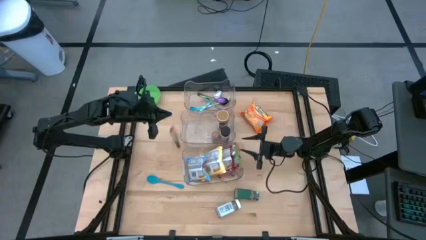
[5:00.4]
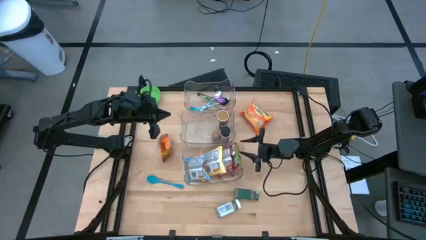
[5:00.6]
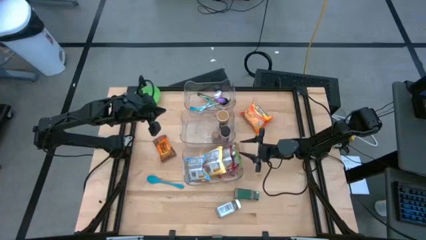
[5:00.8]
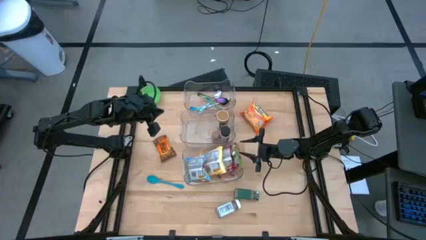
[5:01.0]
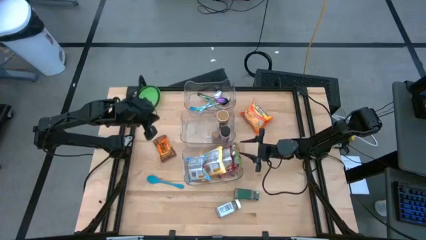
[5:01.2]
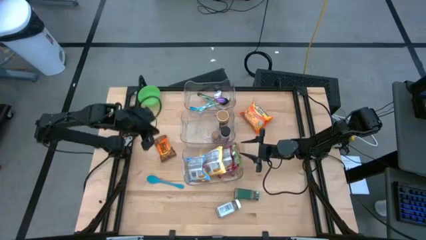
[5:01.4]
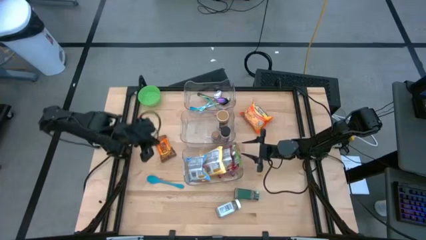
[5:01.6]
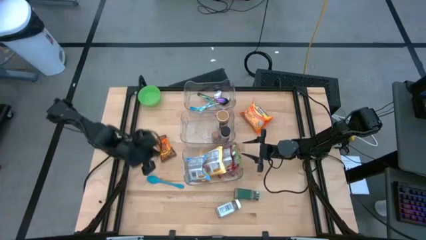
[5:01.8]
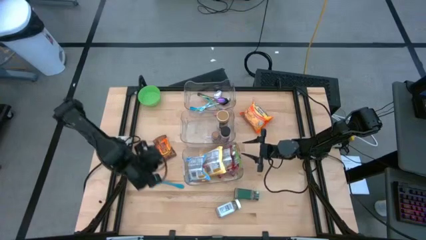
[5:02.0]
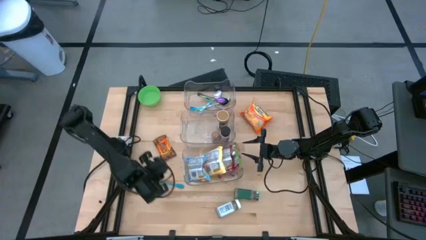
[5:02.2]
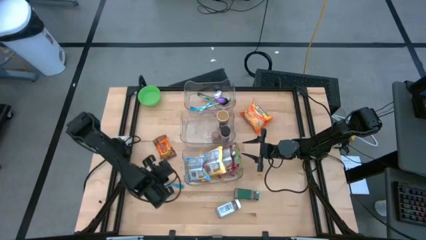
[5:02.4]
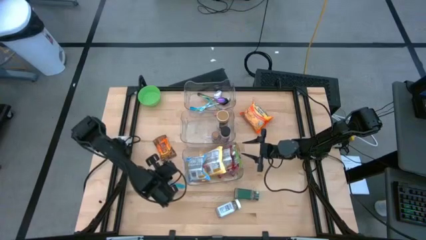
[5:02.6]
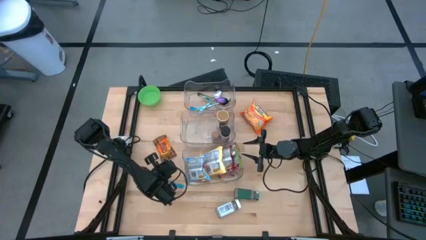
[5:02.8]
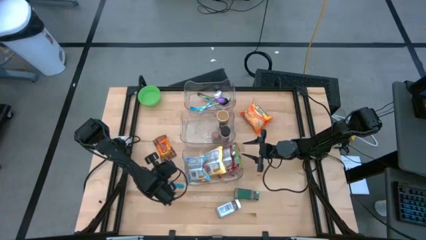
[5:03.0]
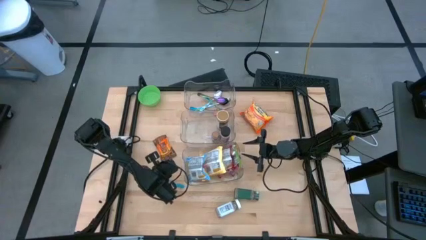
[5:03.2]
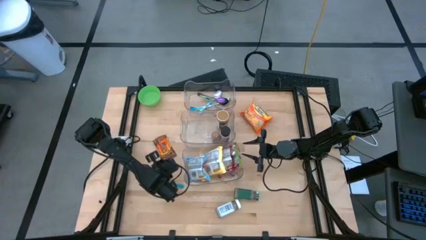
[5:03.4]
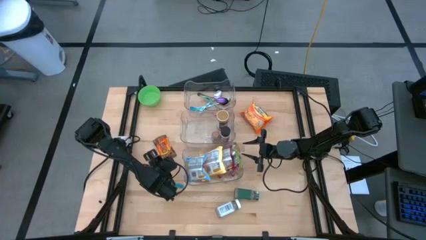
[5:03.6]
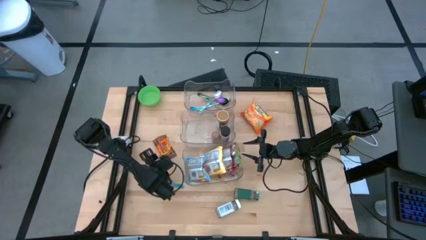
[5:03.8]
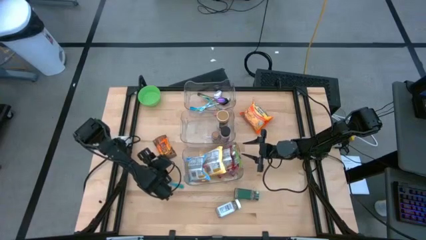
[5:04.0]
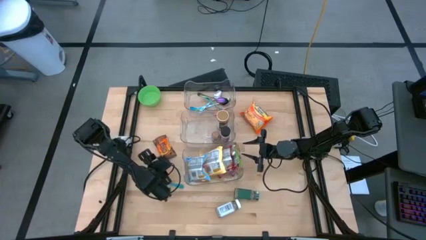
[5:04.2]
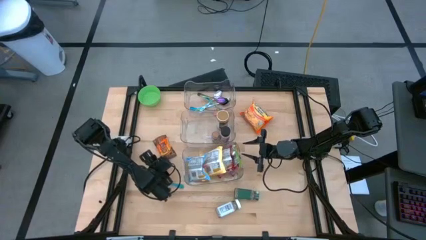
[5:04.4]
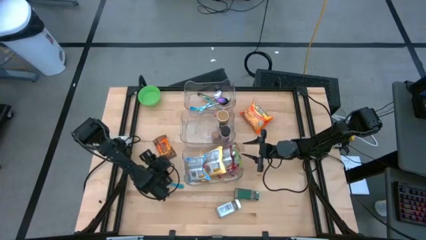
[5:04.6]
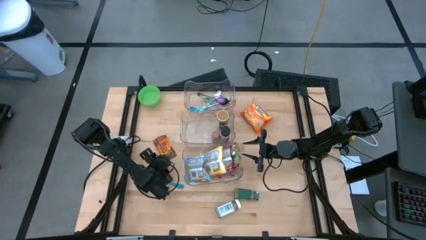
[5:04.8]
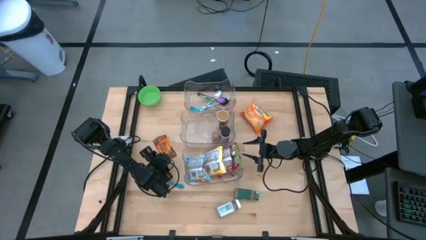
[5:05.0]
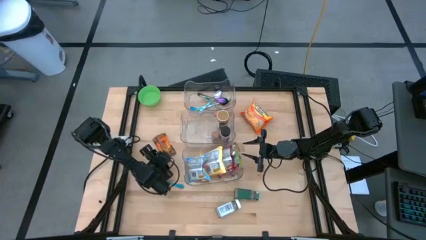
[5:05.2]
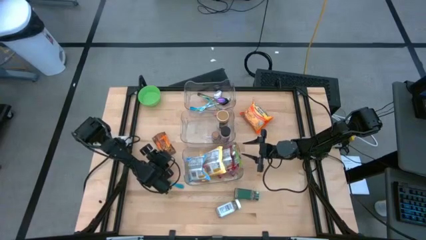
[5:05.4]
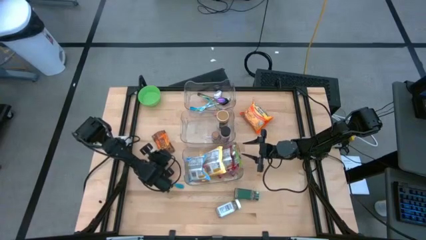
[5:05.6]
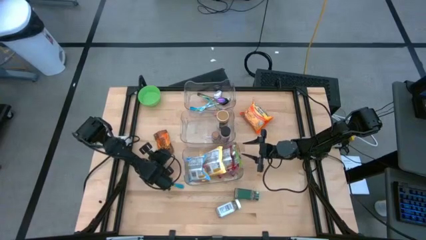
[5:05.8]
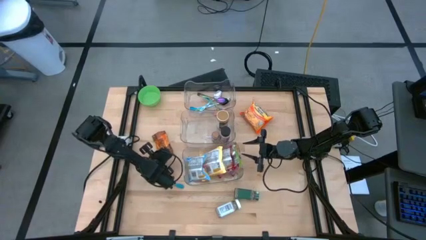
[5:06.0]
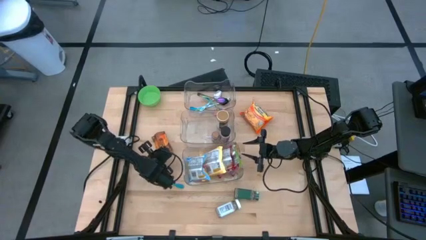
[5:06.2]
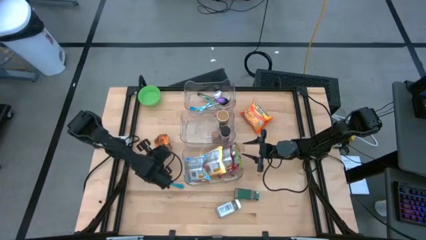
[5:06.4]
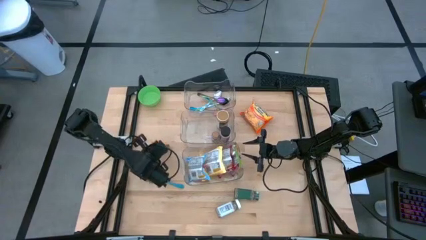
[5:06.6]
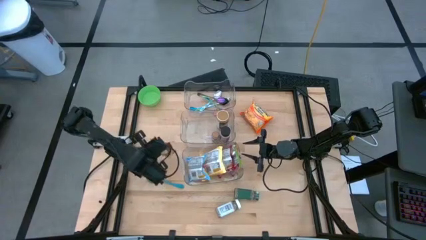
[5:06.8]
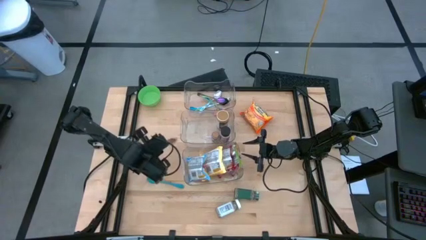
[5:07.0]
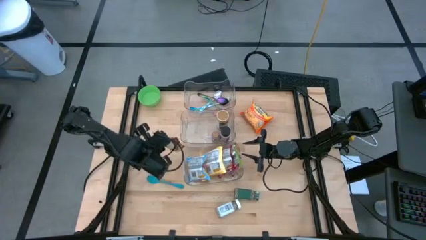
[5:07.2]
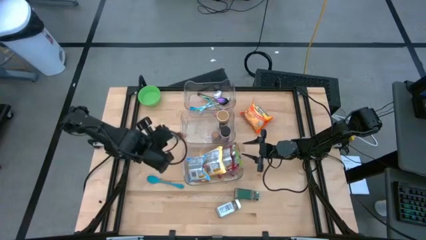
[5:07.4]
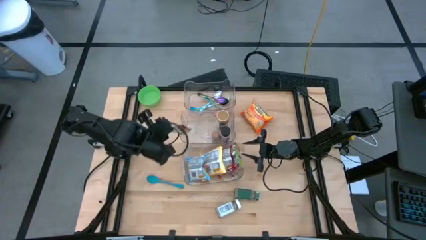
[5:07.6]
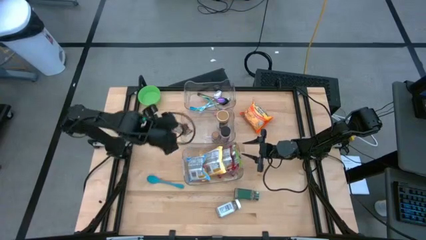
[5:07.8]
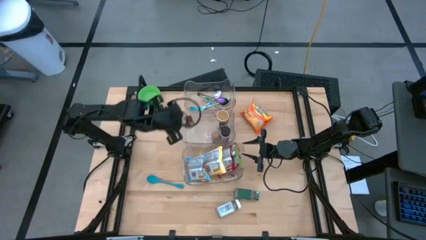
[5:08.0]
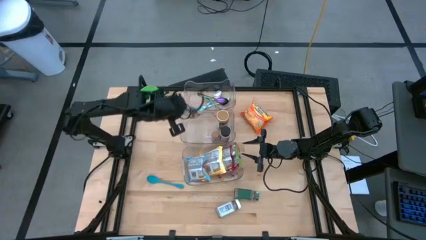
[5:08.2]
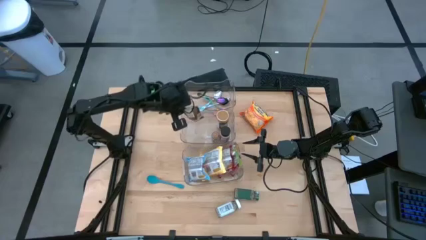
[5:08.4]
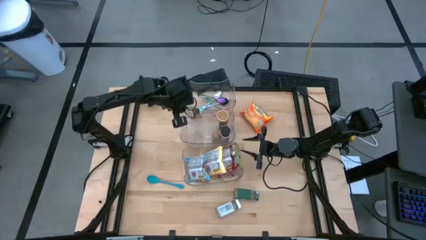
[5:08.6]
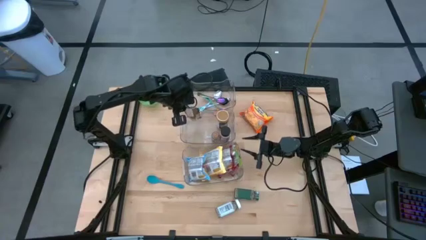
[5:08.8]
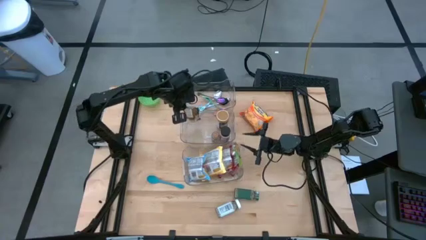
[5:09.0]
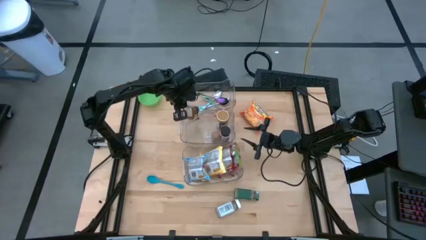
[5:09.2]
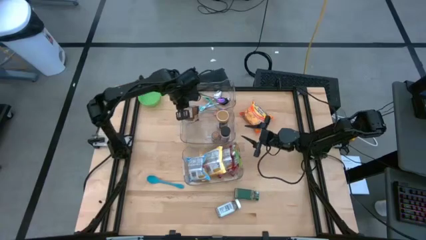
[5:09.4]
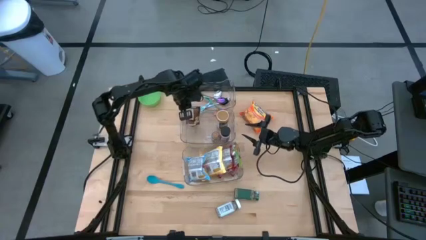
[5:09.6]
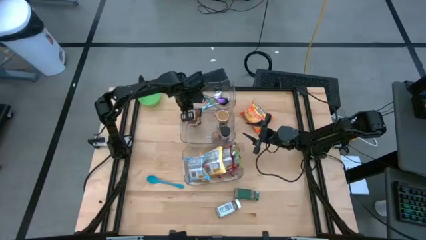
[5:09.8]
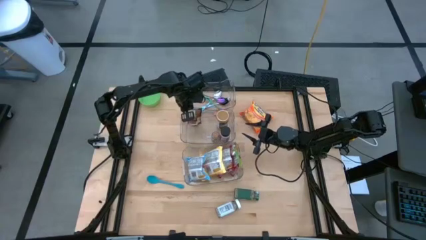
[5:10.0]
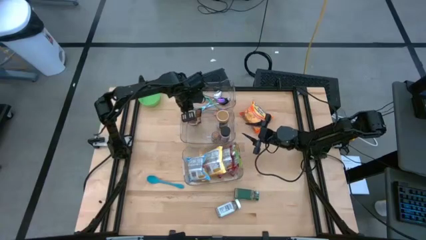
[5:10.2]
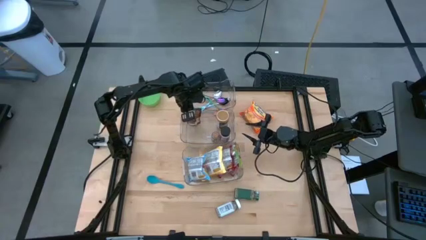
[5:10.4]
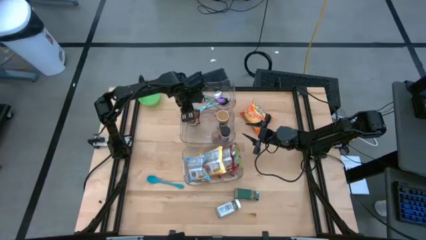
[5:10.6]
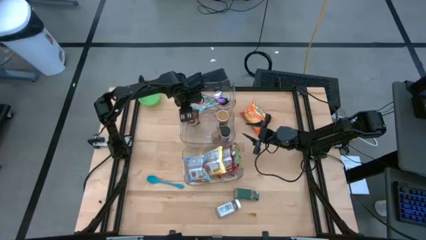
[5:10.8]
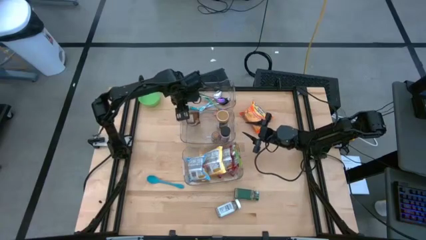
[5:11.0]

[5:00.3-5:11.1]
Task: Pick & Place Food Item
Put the orange seasoning packet into the middle transparent bin

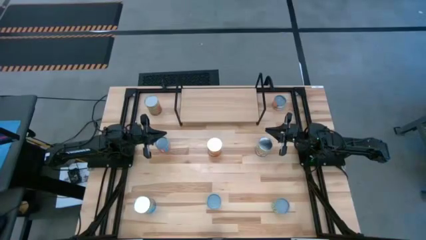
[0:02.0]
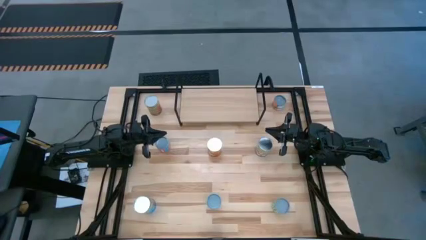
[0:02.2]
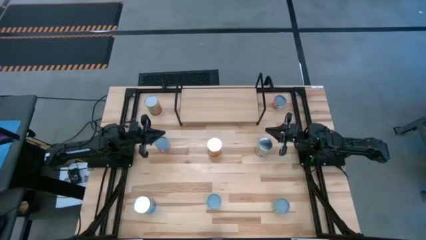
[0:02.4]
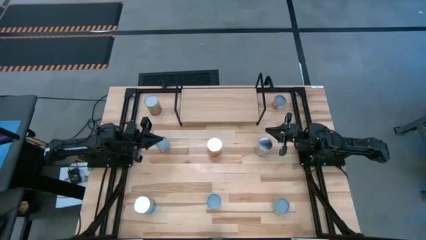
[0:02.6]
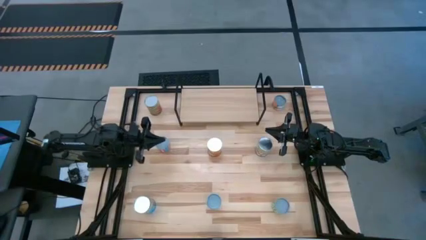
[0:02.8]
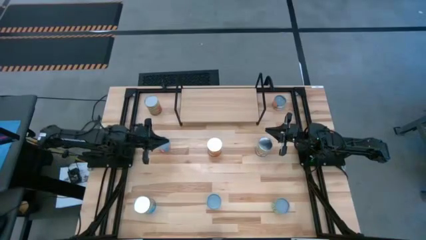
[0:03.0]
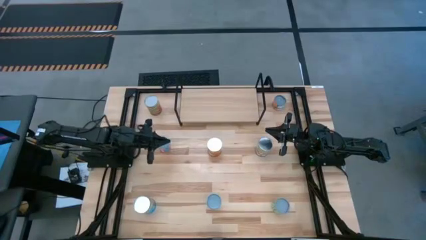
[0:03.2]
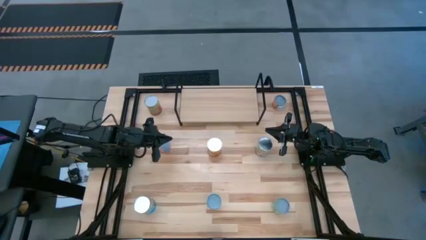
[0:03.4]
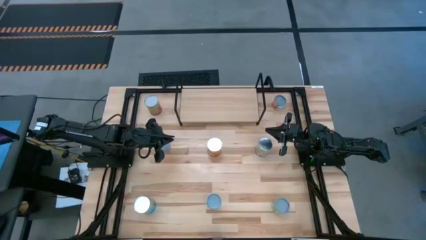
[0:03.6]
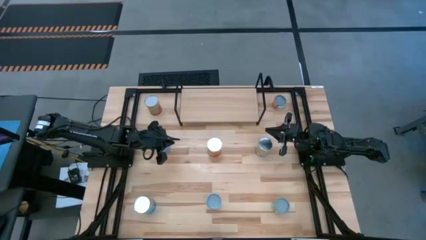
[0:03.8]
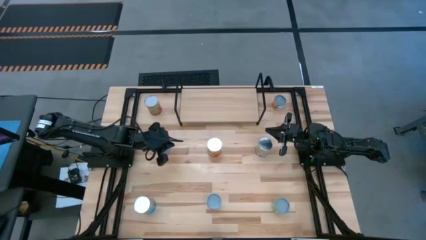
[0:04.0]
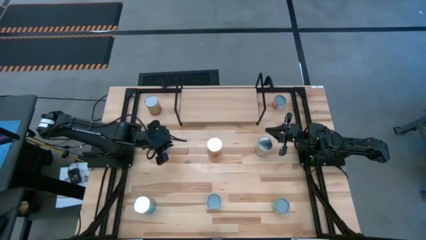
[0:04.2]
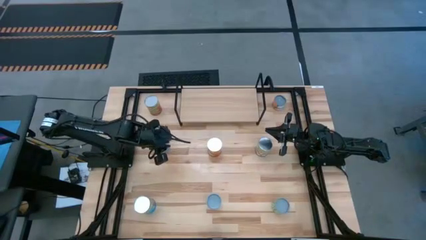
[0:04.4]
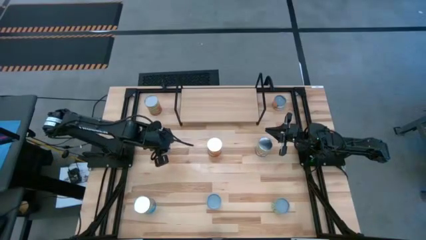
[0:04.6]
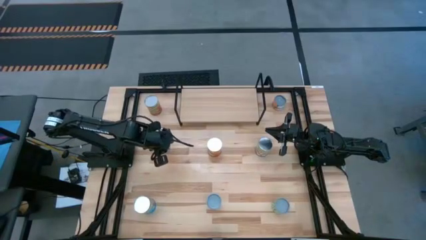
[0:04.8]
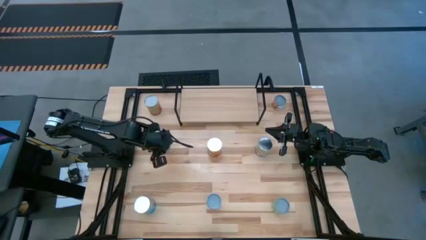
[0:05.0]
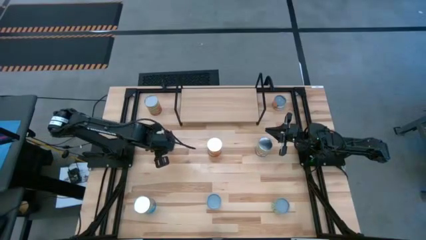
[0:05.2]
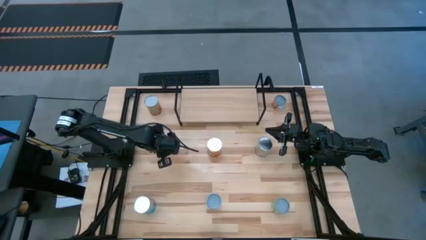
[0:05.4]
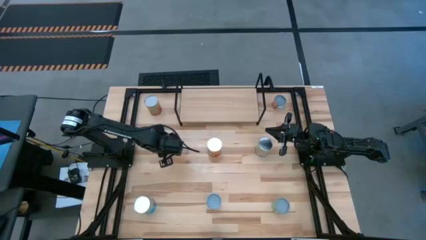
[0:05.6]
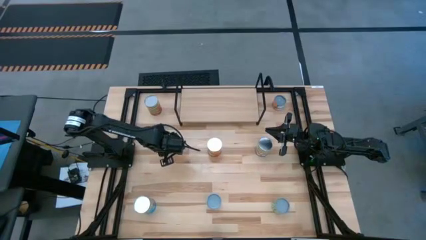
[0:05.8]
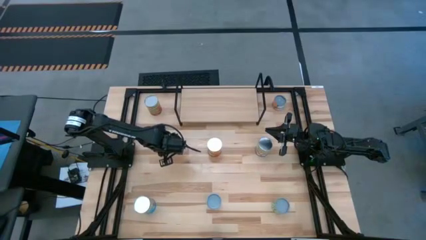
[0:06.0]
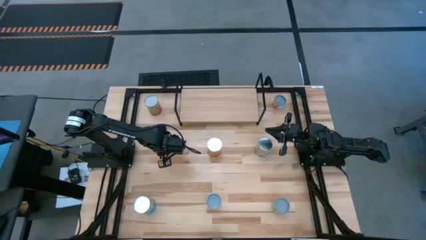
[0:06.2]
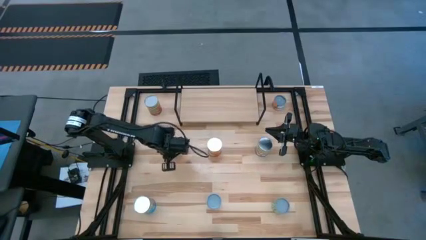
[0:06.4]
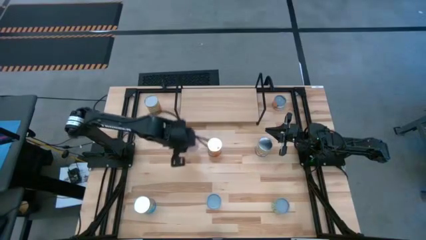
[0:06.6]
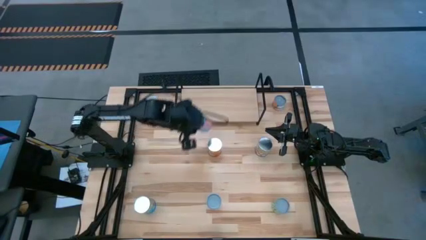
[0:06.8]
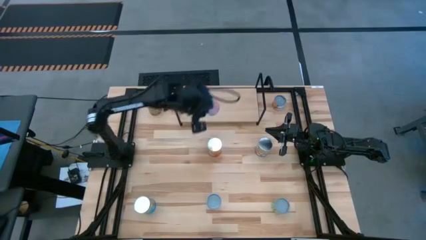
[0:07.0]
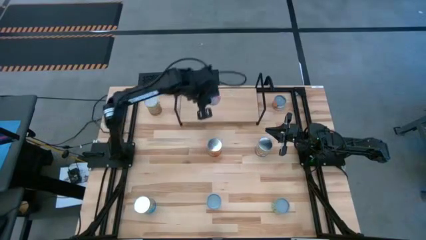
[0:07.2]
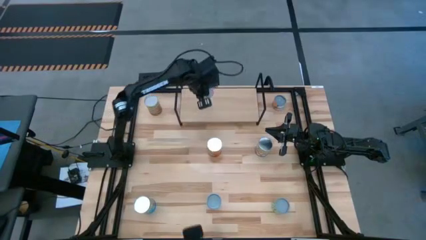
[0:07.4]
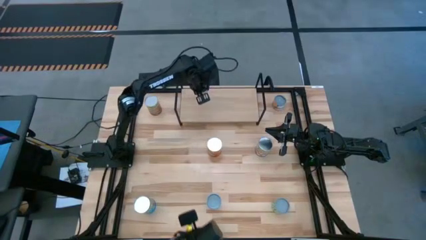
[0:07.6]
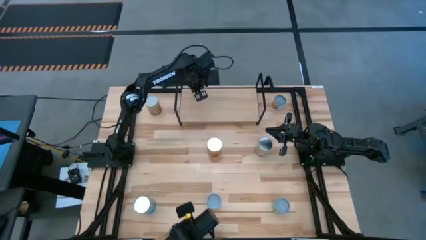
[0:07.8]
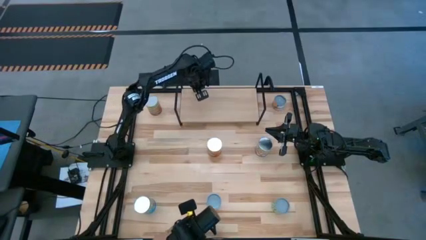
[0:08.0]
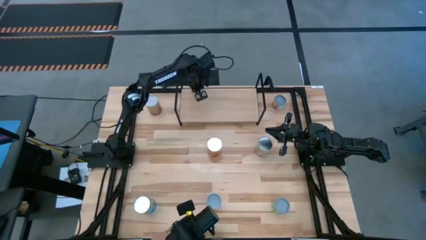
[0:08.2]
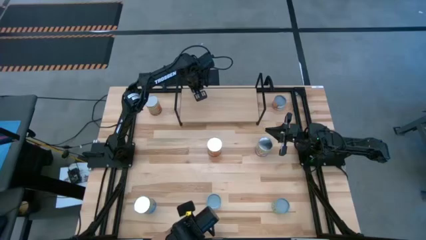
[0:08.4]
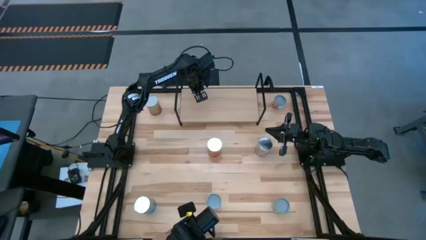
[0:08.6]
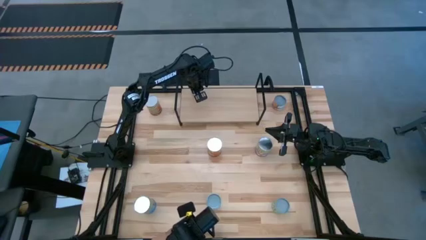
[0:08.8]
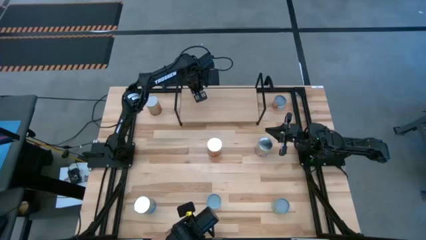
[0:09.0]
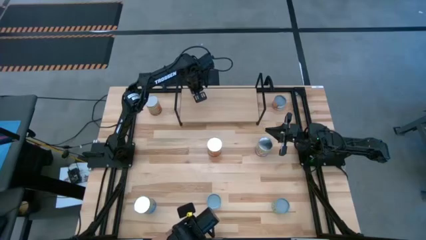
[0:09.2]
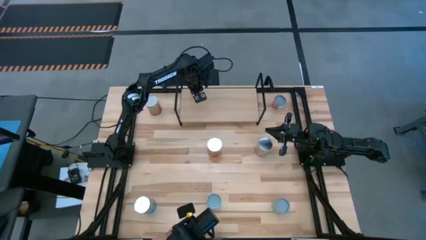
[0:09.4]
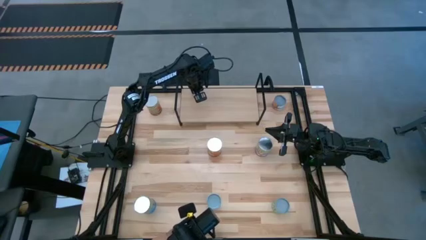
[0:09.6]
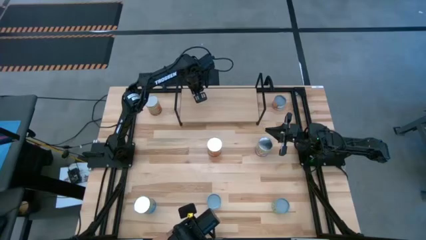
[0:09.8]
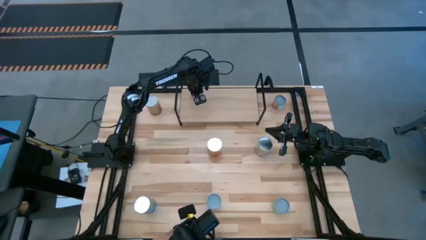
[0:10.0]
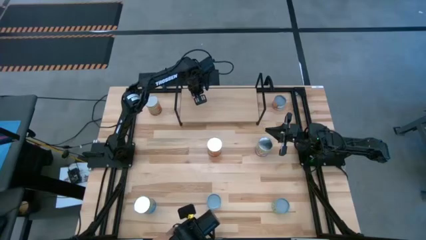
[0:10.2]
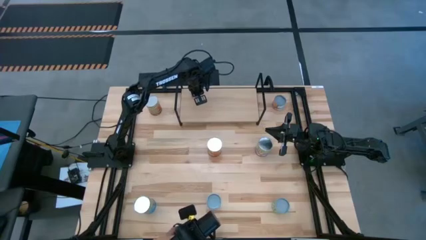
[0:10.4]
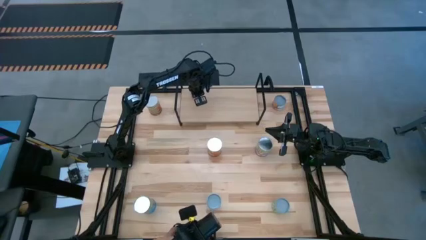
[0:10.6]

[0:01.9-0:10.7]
Task: Pick and place cans onto a shelf
Put the blue can on the shelf
